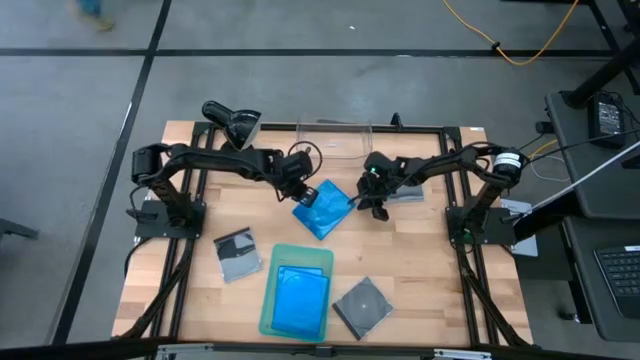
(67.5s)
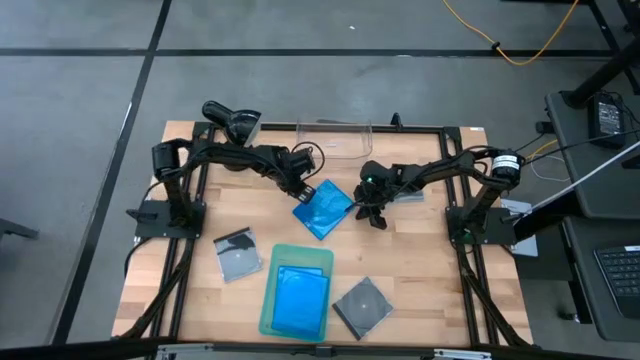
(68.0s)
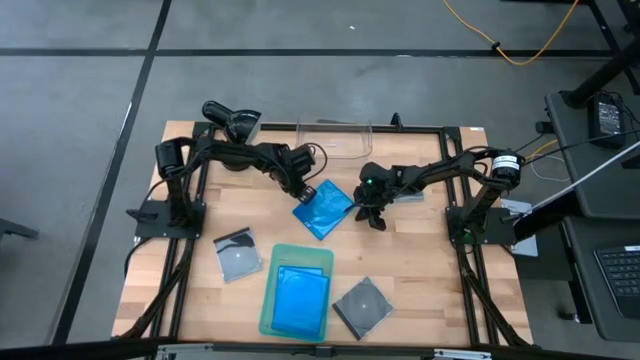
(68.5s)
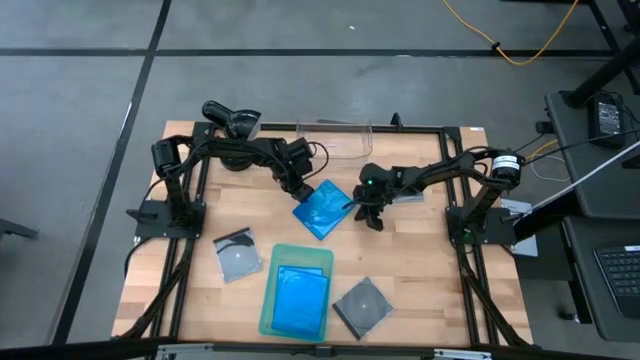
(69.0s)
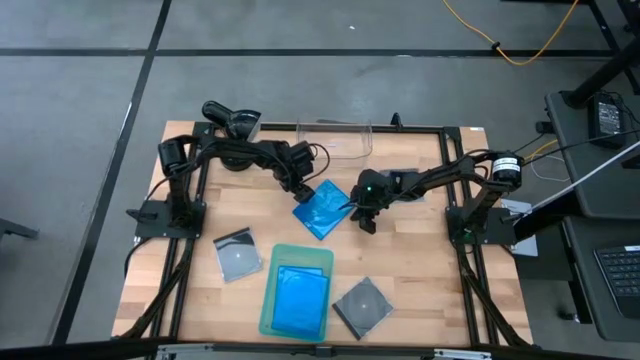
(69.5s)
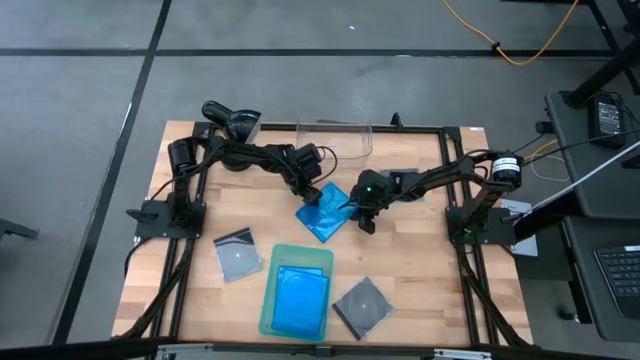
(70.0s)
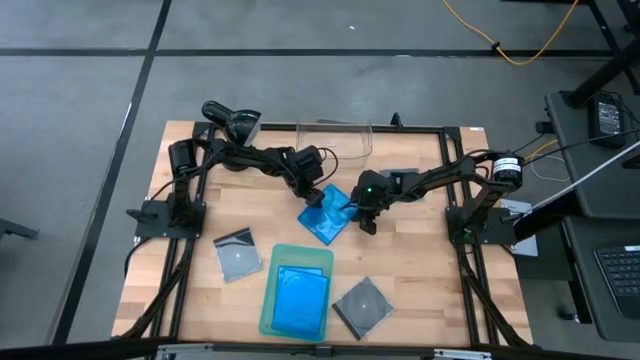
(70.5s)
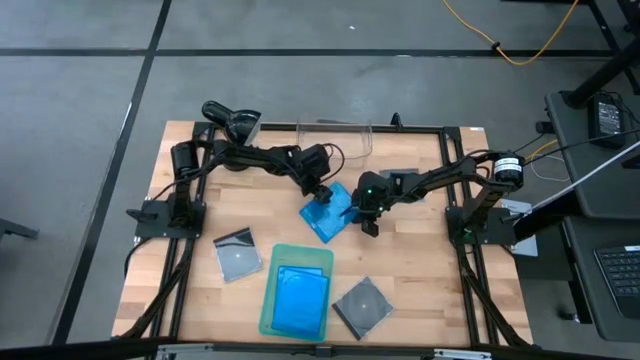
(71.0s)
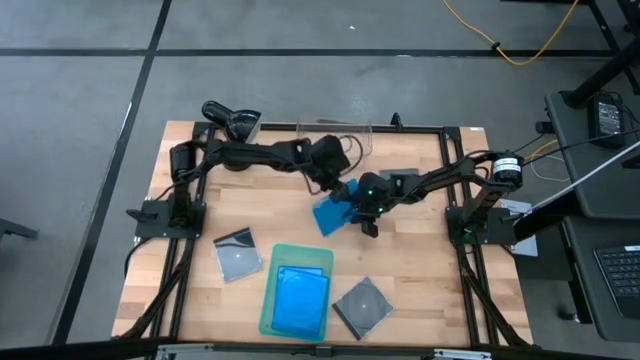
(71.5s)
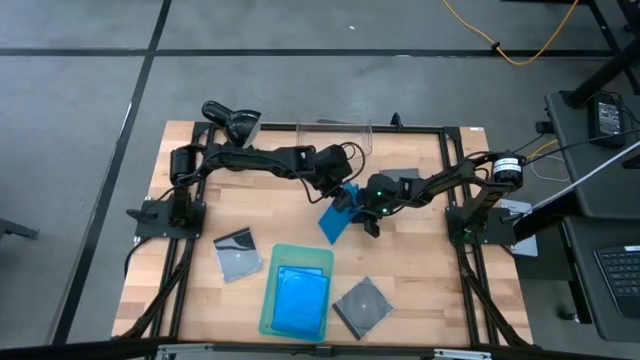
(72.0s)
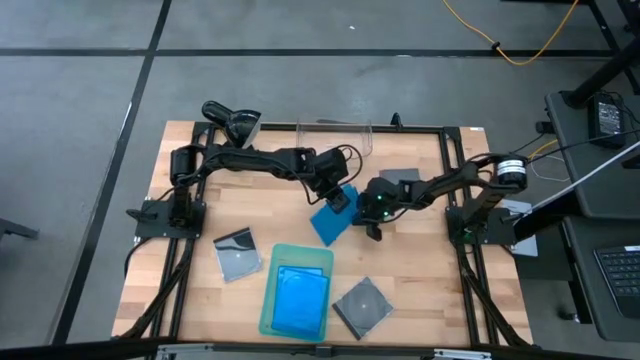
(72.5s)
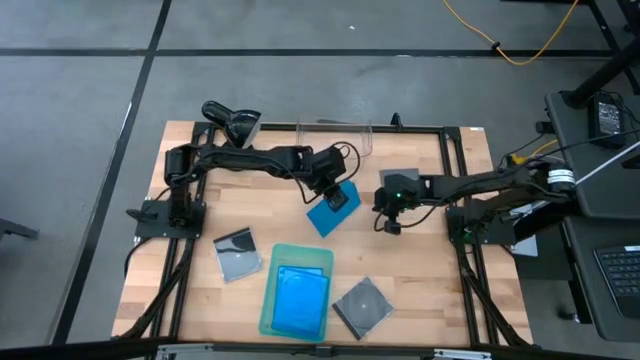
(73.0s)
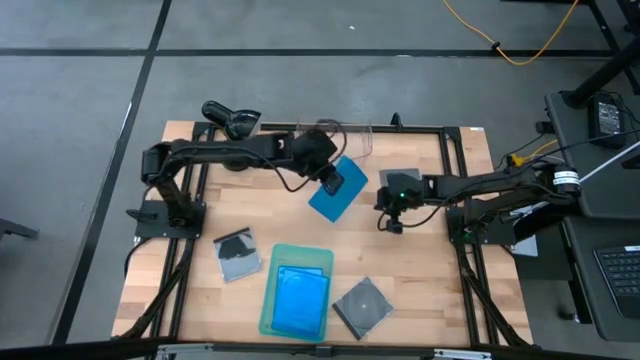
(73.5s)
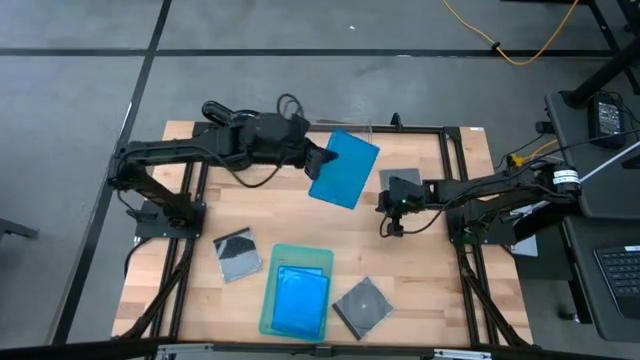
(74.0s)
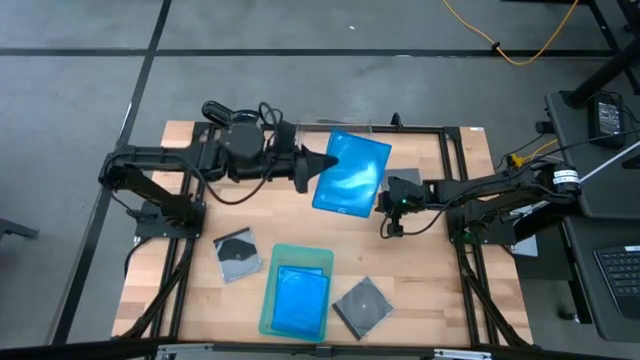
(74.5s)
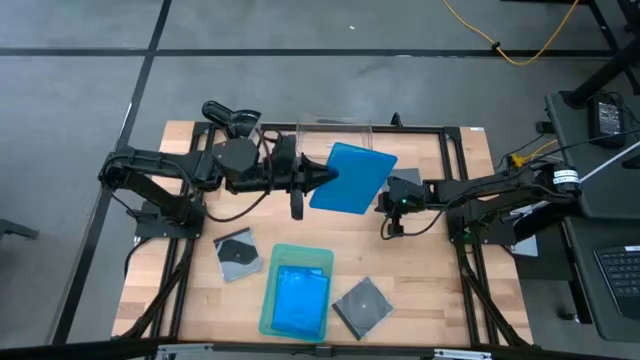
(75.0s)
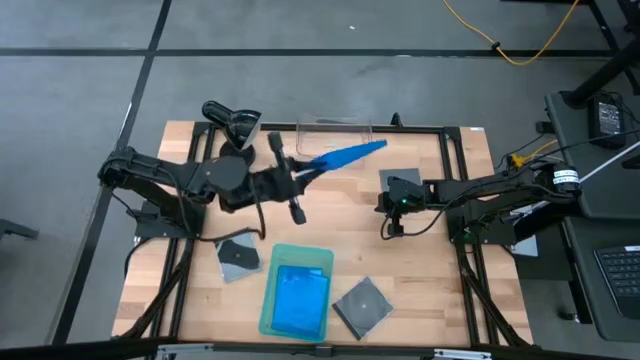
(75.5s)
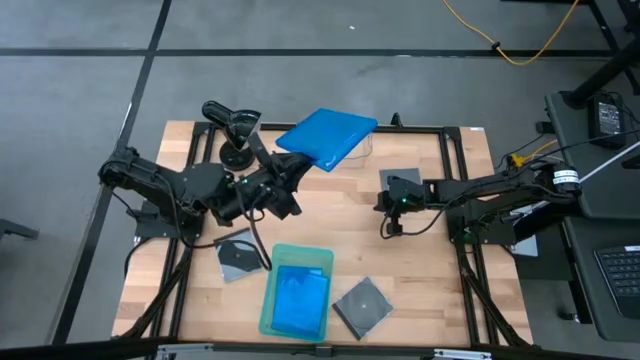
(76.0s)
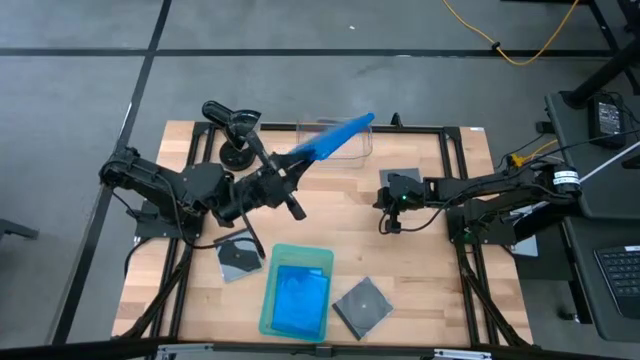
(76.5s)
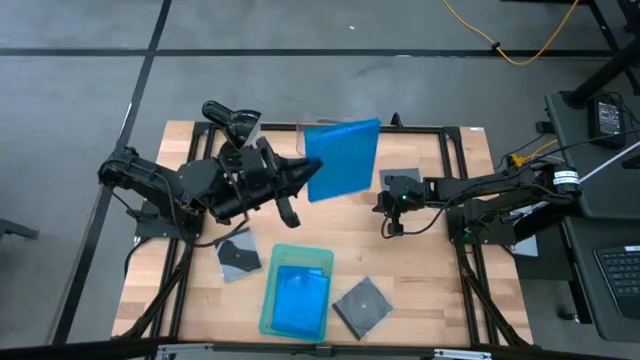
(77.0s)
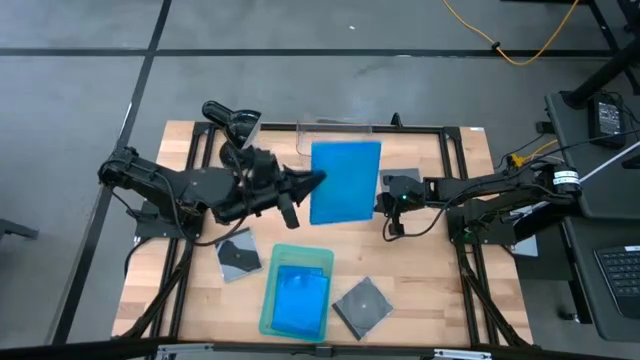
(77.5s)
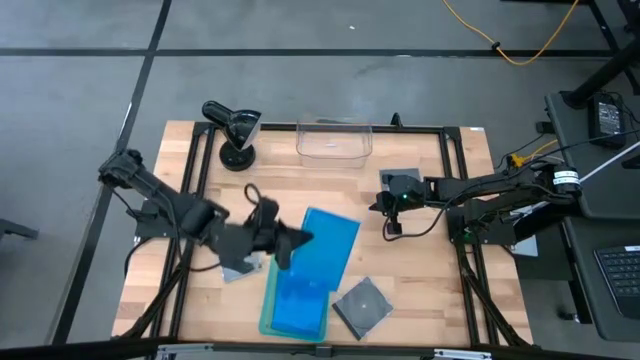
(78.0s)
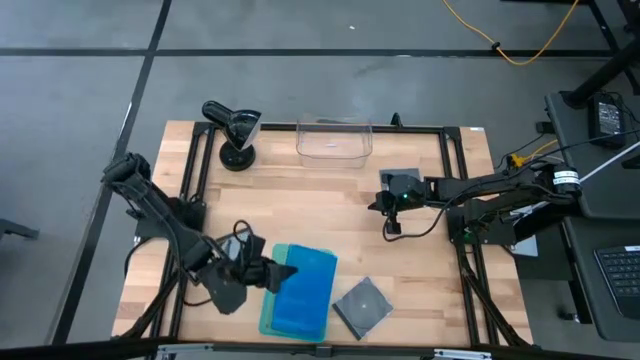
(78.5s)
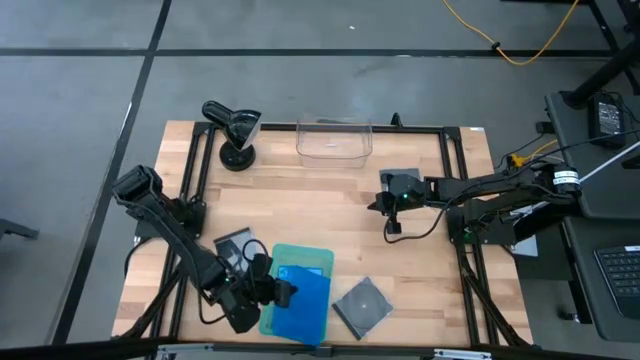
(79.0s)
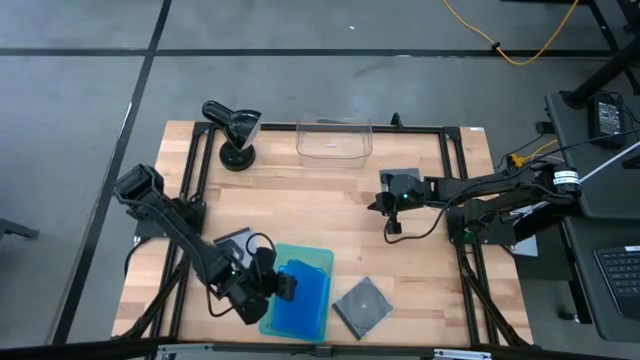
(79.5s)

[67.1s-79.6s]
Task: Pick & place jewel cases by type
Put the blue cd case into the green bin

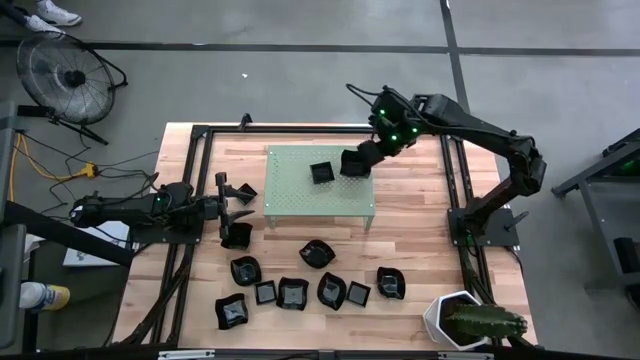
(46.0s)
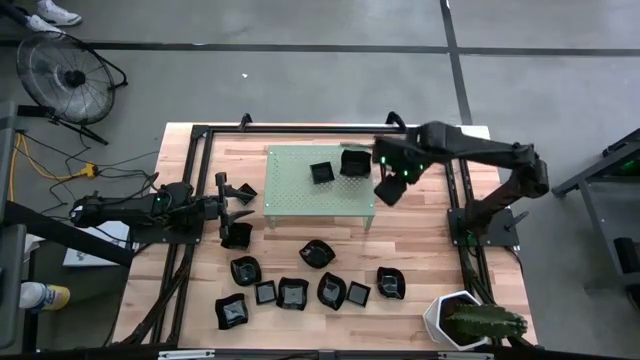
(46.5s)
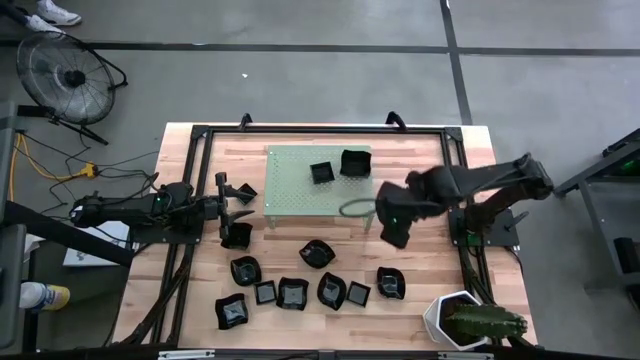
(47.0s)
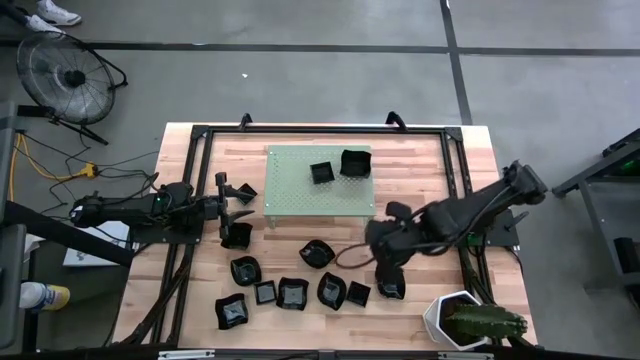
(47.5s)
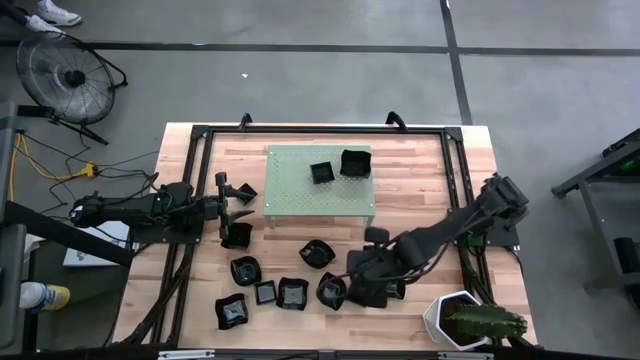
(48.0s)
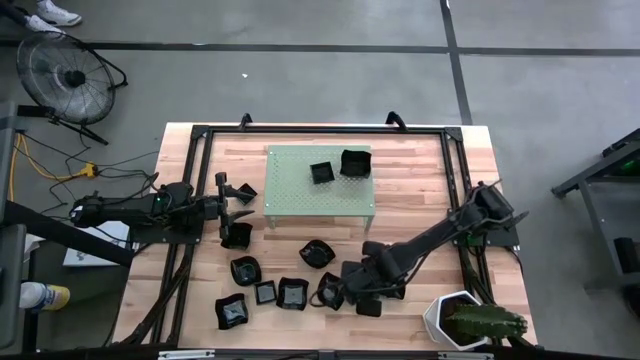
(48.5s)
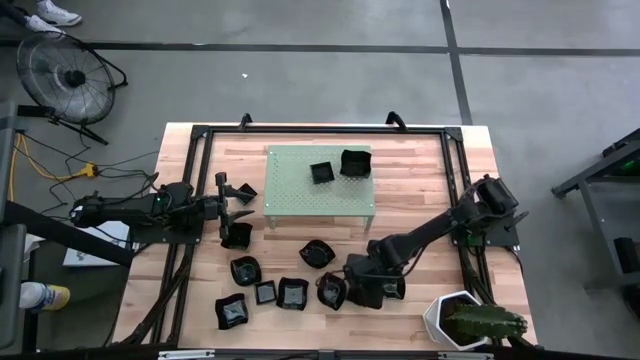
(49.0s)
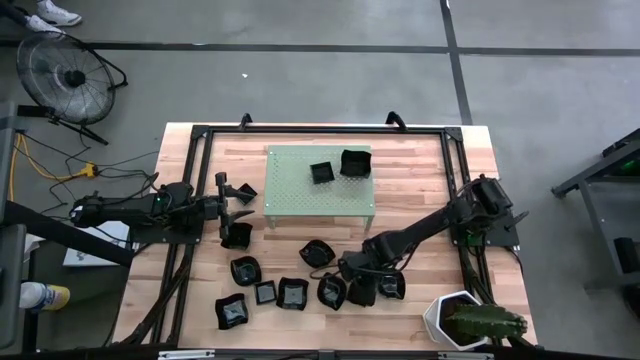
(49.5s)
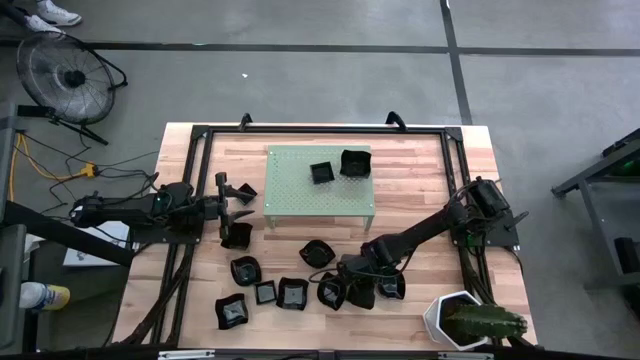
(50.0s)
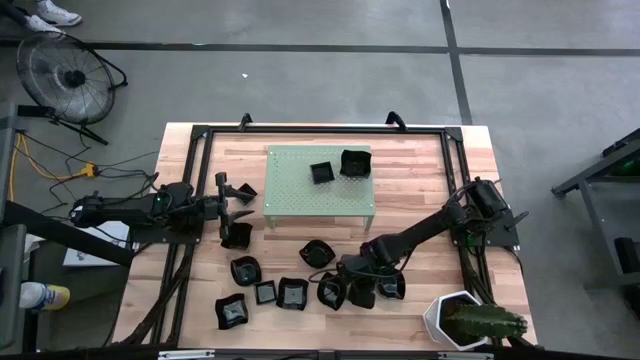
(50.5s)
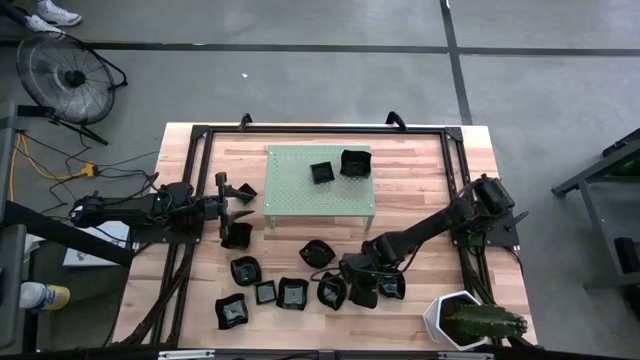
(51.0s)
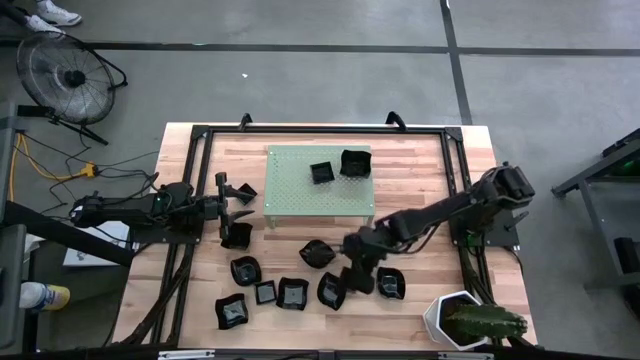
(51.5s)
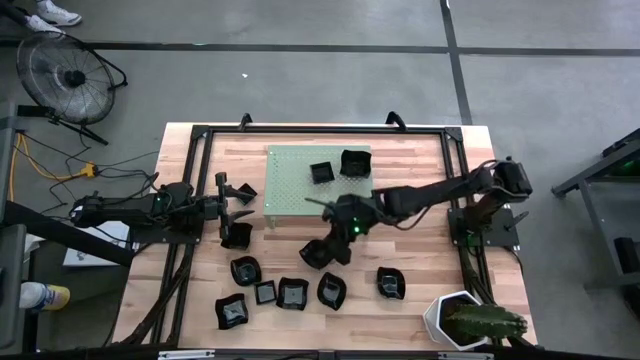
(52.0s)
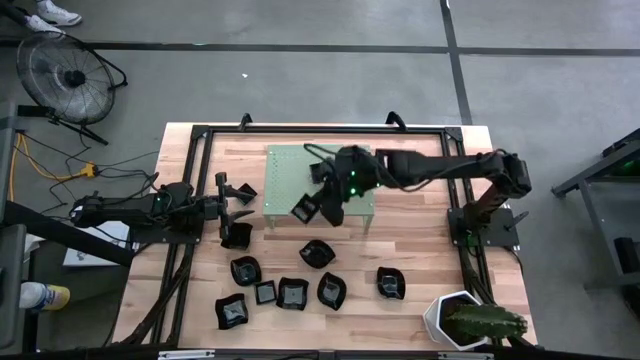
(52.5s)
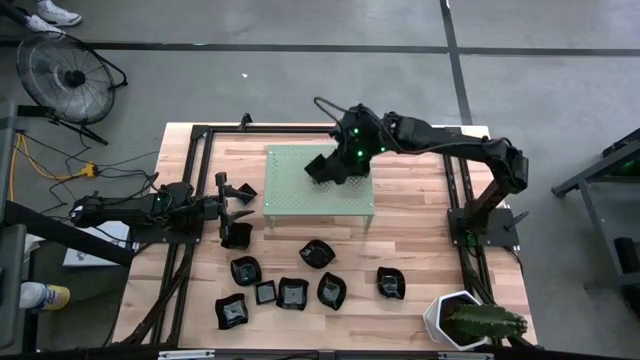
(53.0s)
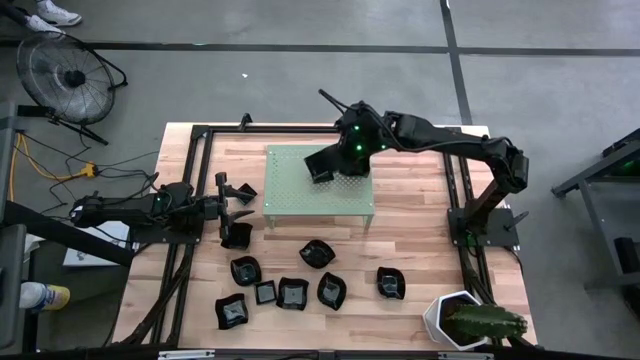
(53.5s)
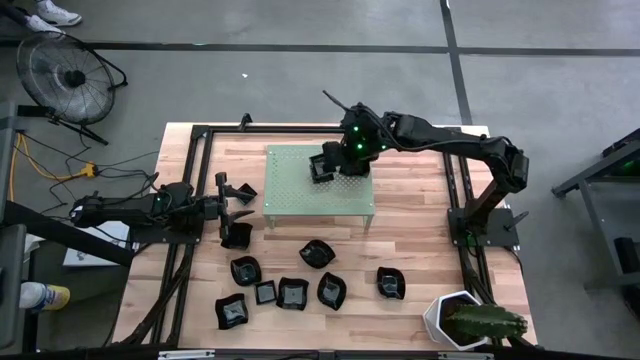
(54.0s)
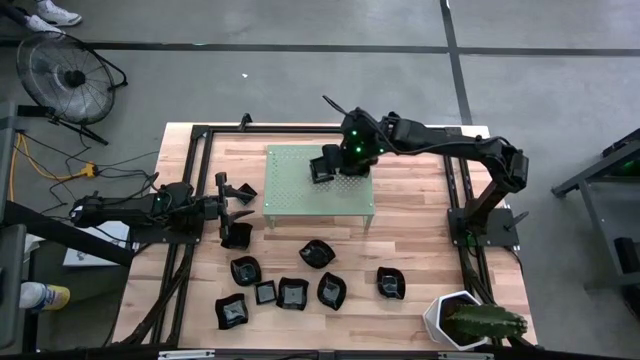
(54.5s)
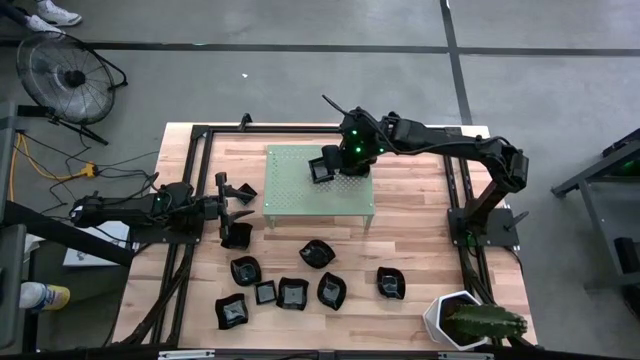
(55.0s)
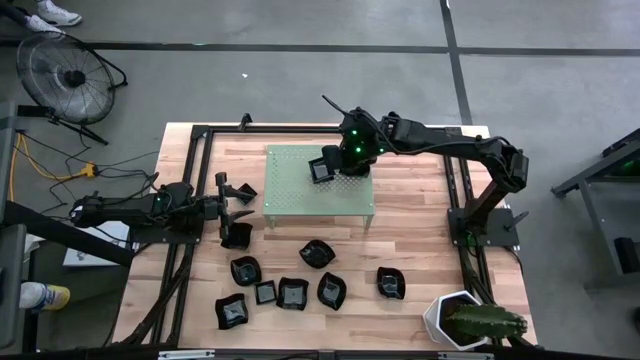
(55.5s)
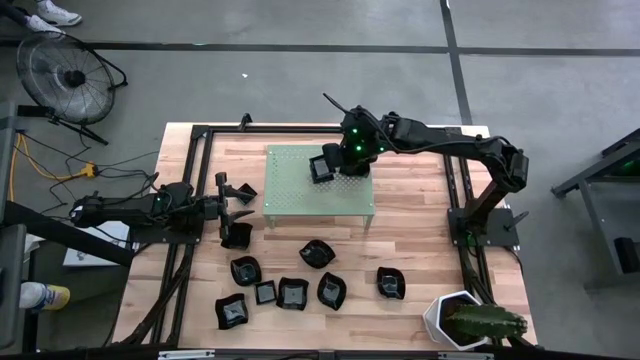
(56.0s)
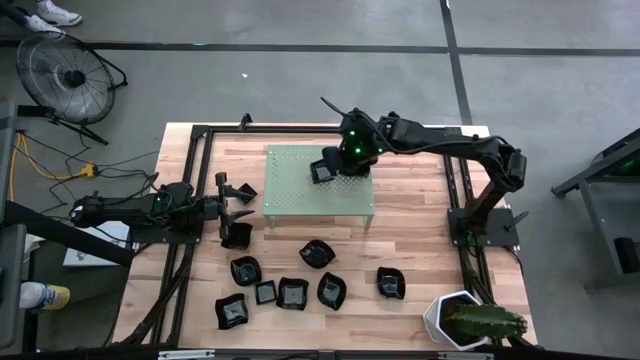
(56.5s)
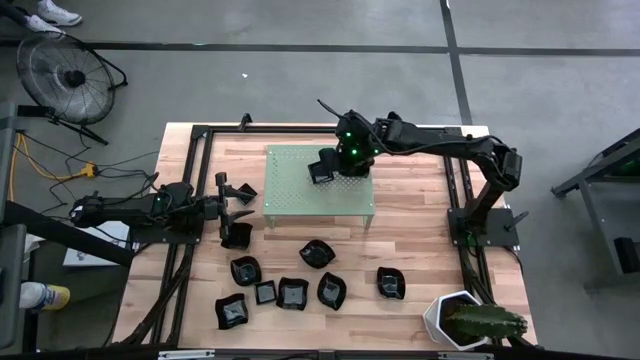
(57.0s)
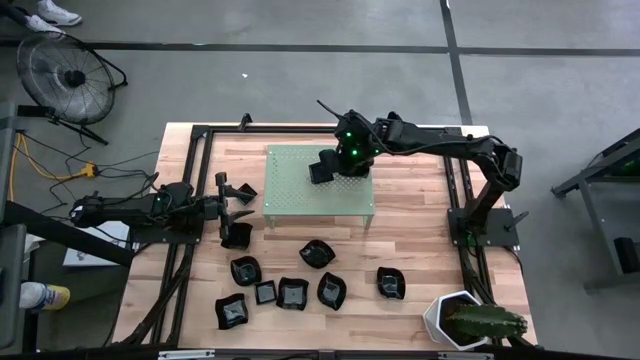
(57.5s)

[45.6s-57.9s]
Task: Pick & Place Mini shaped plates
Stack the square plate on top of the other square plates on the shelf
